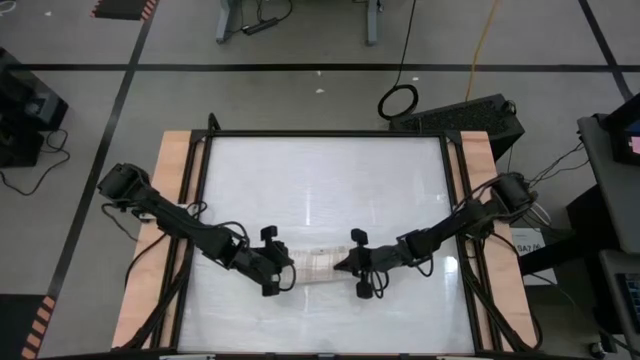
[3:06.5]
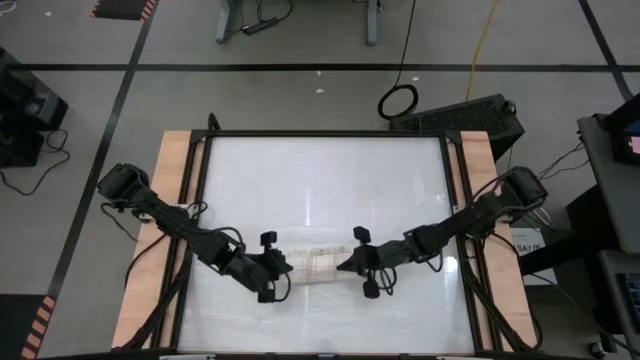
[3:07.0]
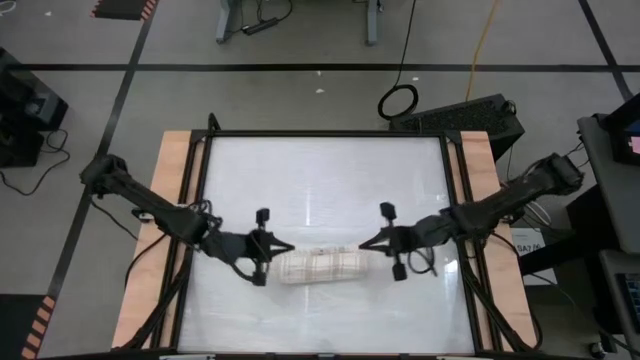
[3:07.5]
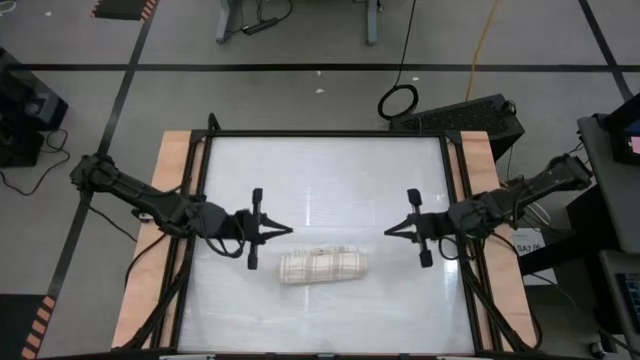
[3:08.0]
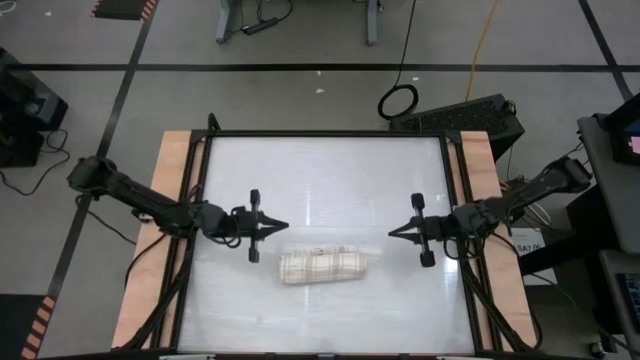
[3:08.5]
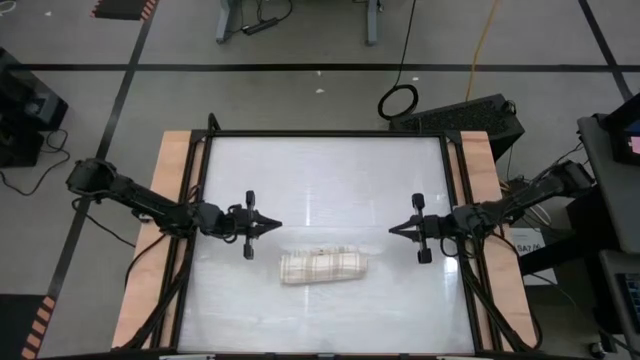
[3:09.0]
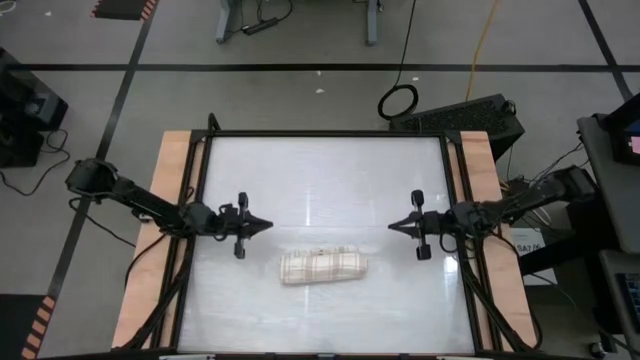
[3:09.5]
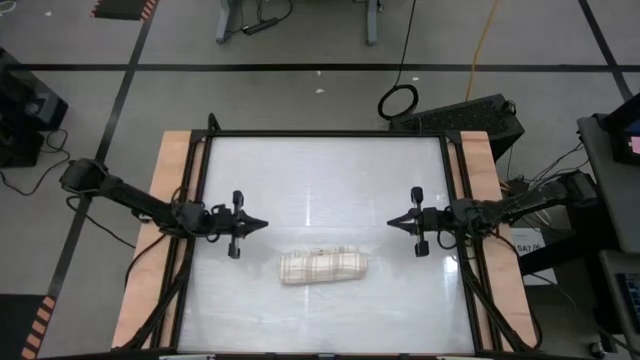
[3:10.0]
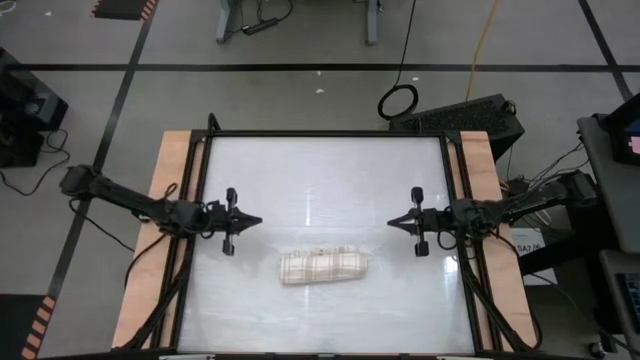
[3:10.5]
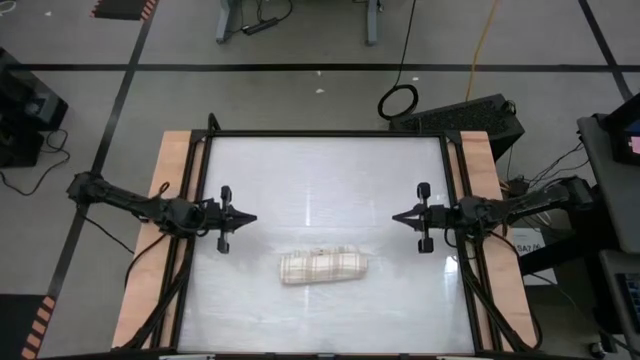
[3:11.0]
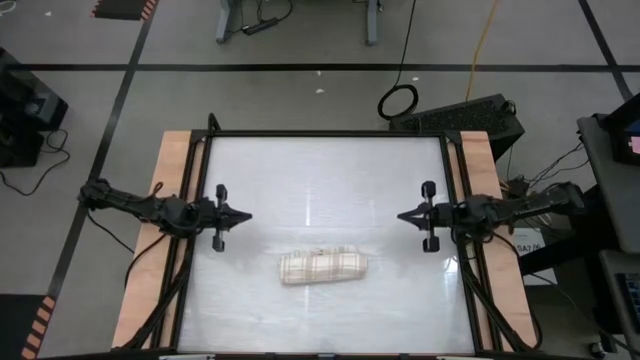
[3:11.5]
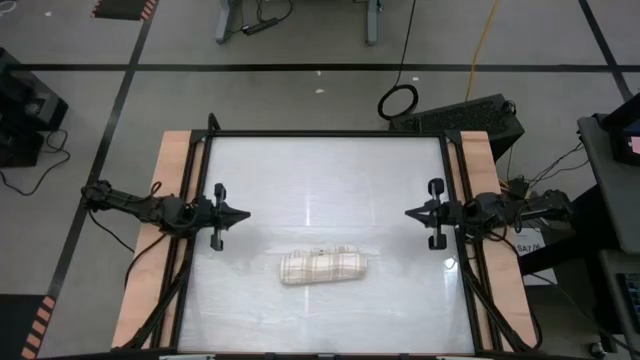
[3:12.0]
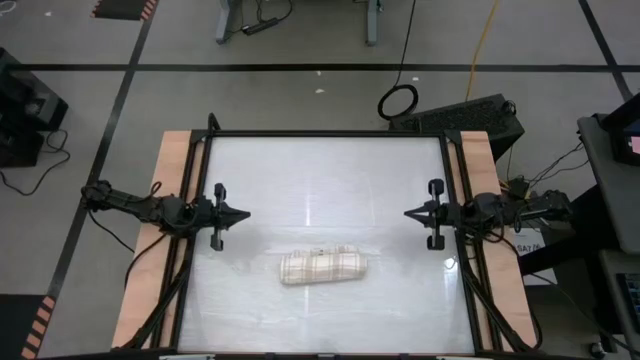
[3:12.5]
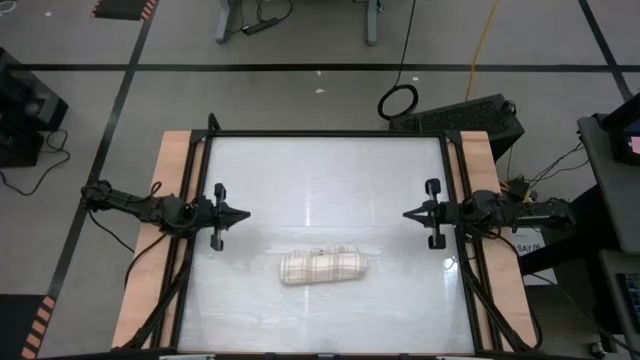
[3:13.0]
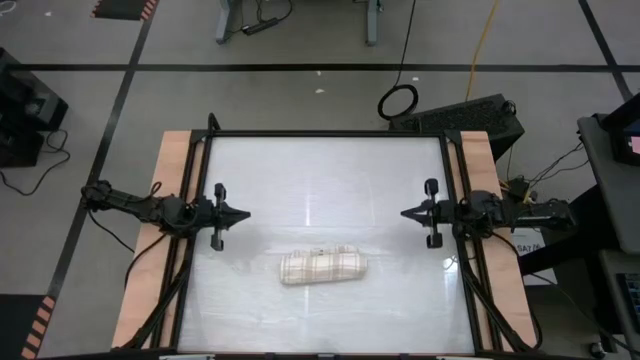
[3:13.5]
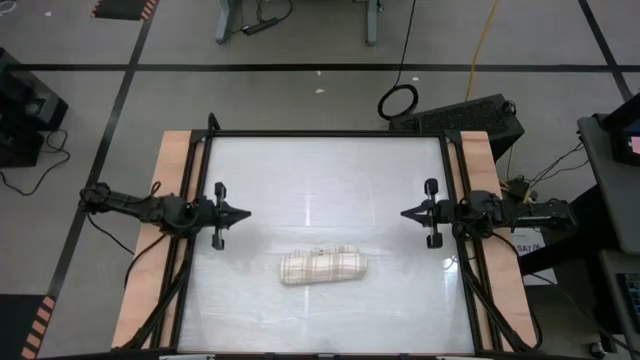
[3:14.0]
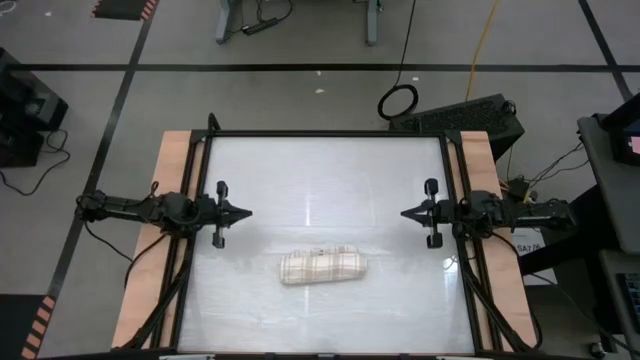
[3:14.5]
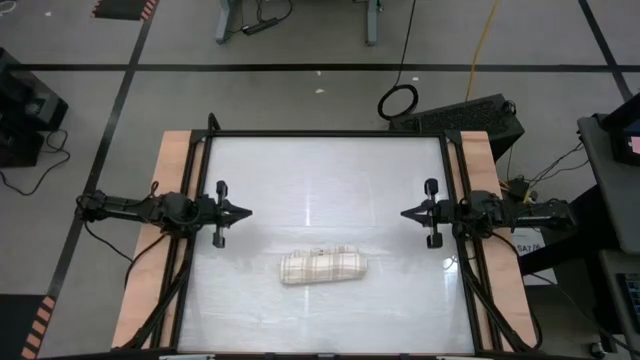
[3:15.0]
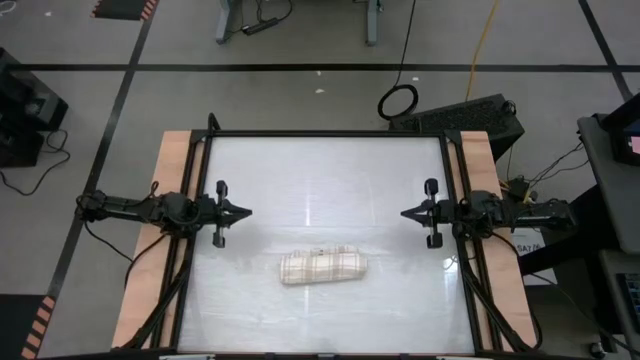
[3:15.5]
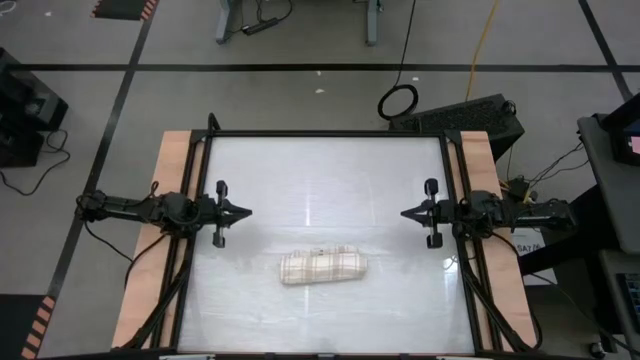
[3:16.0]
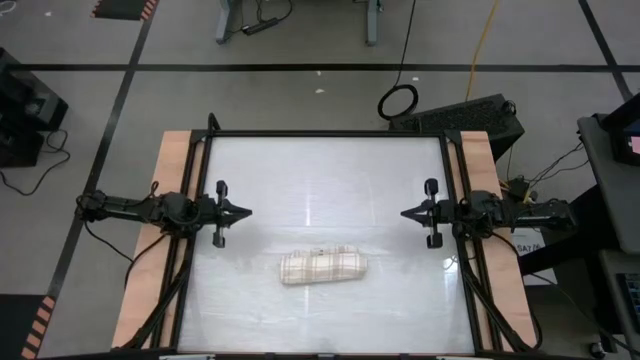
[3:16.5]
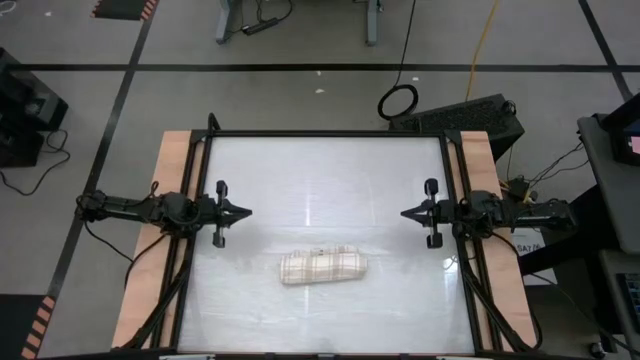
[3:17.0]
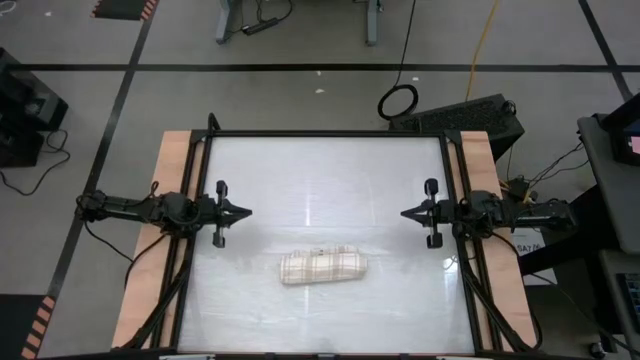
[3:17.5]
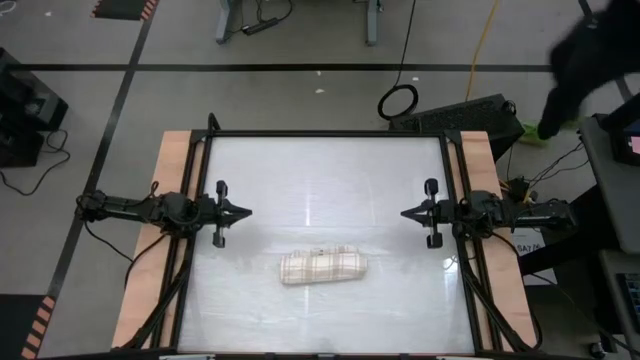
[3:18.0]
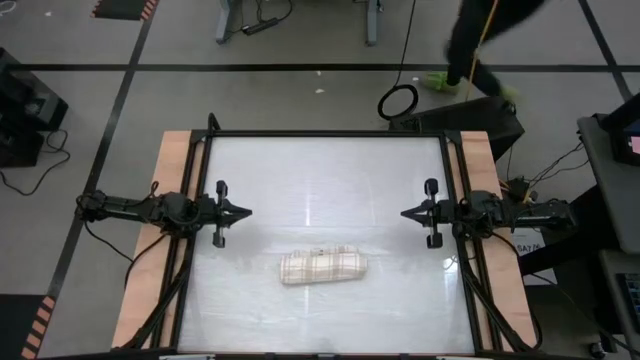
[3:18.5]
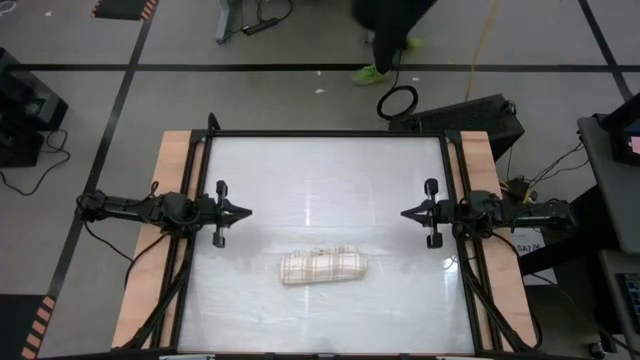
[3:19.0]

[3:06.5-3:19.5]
Task: Roll towel
Return to Home Position

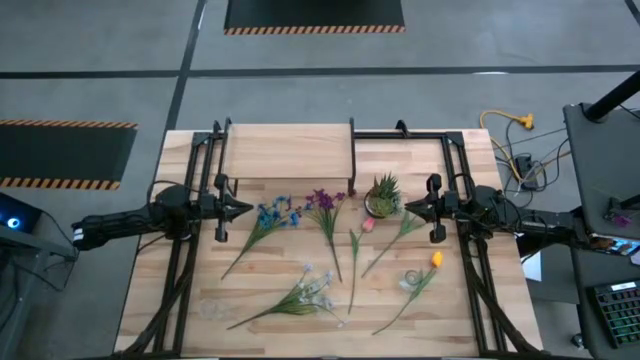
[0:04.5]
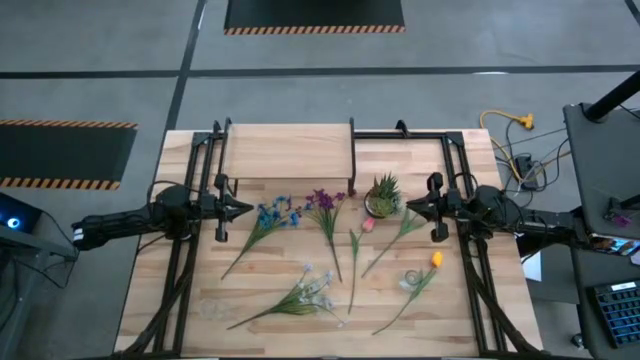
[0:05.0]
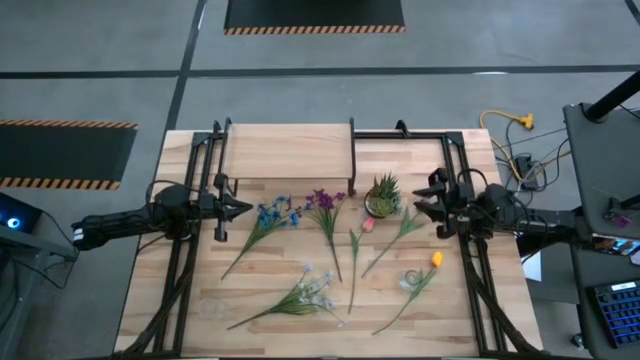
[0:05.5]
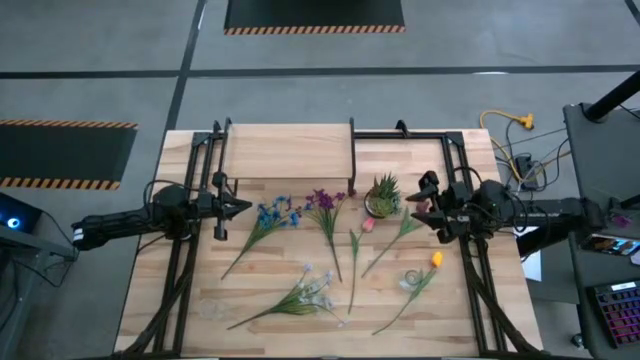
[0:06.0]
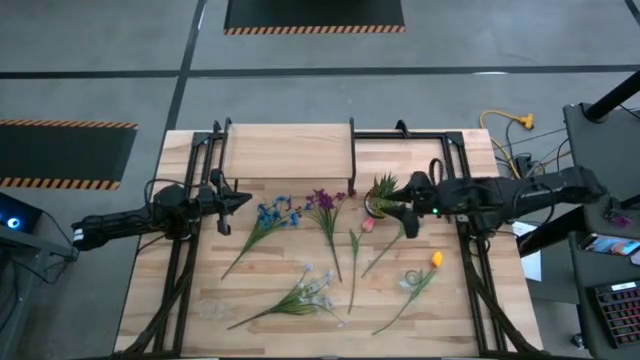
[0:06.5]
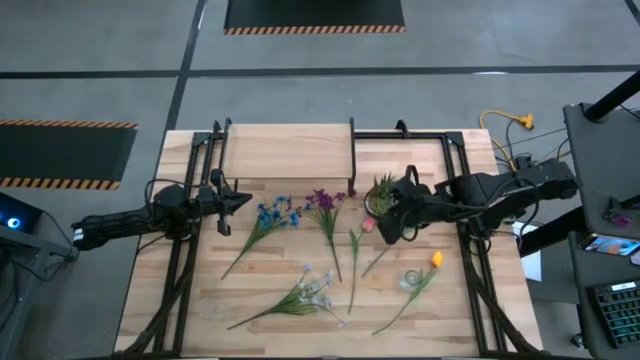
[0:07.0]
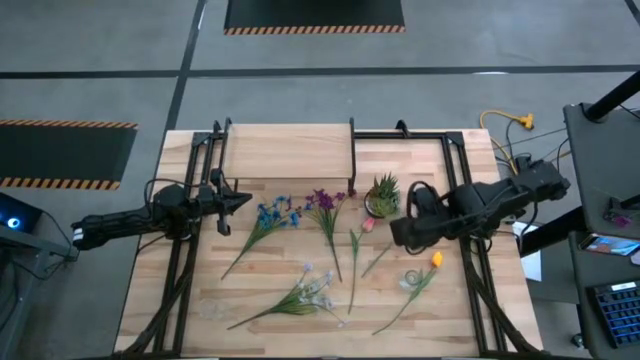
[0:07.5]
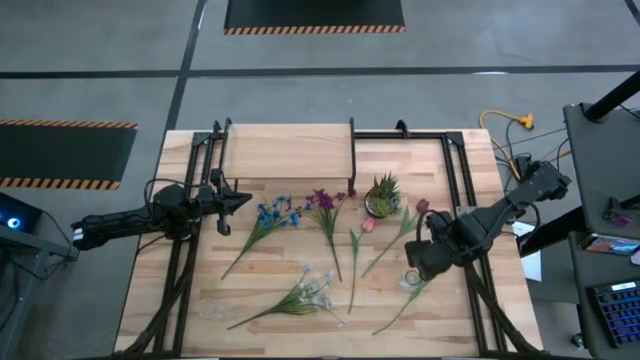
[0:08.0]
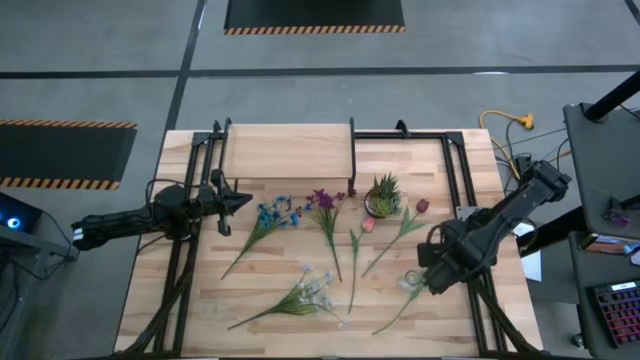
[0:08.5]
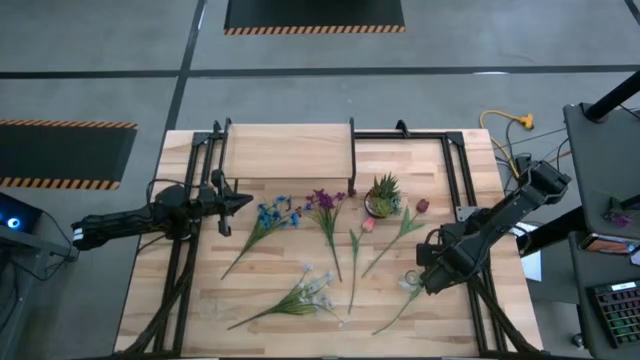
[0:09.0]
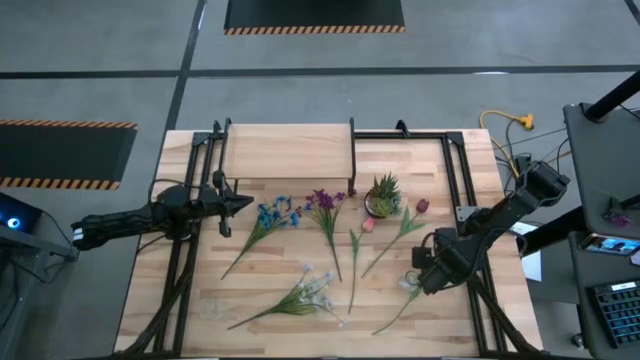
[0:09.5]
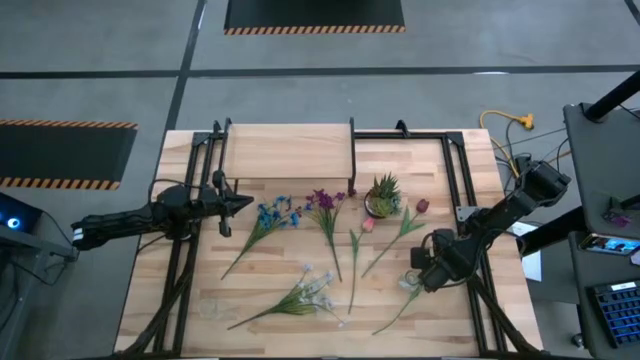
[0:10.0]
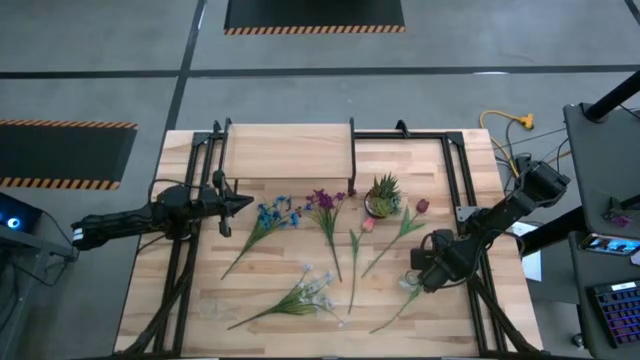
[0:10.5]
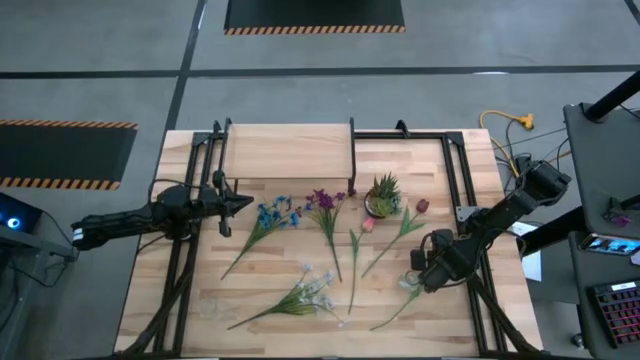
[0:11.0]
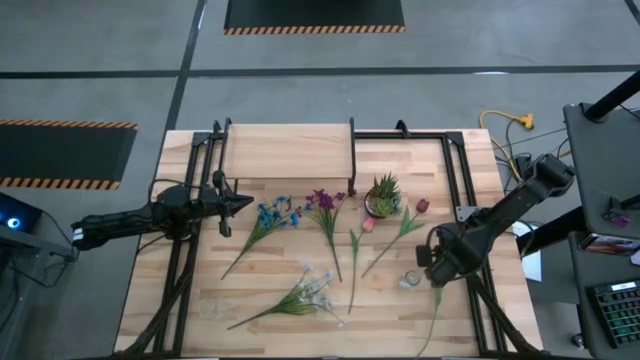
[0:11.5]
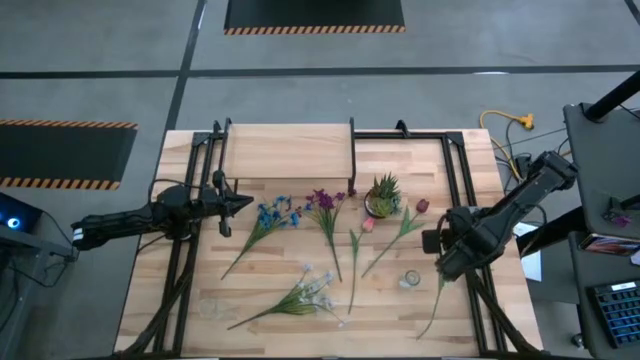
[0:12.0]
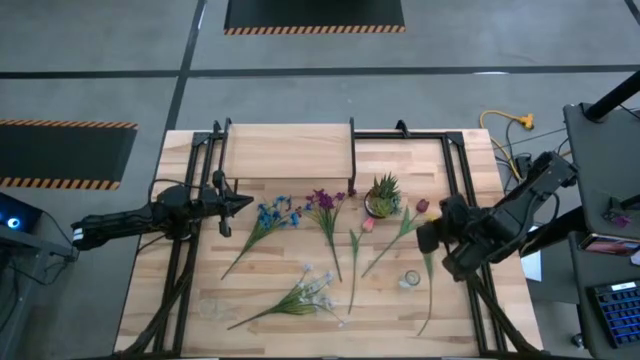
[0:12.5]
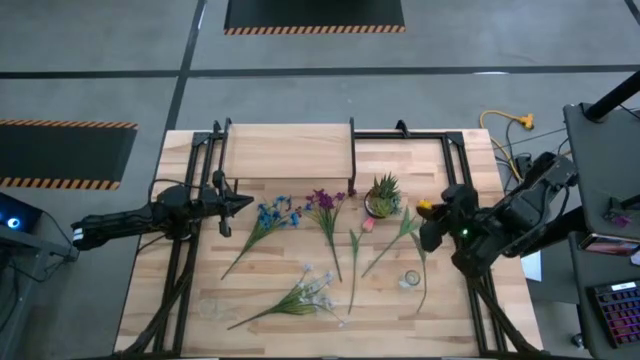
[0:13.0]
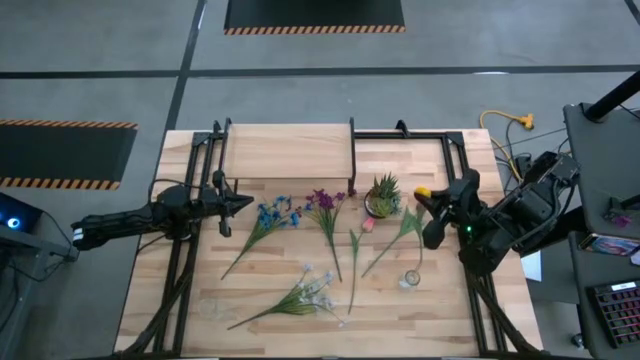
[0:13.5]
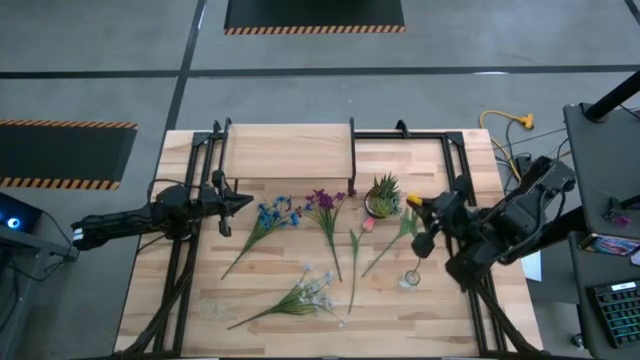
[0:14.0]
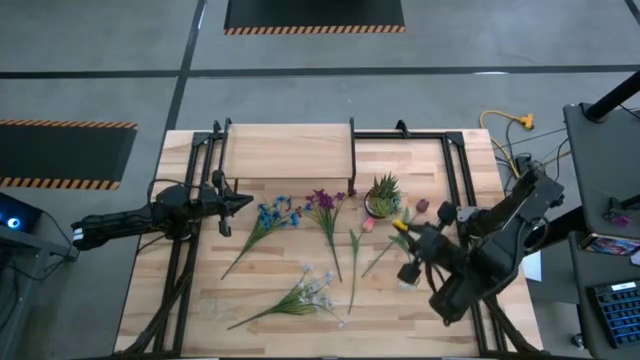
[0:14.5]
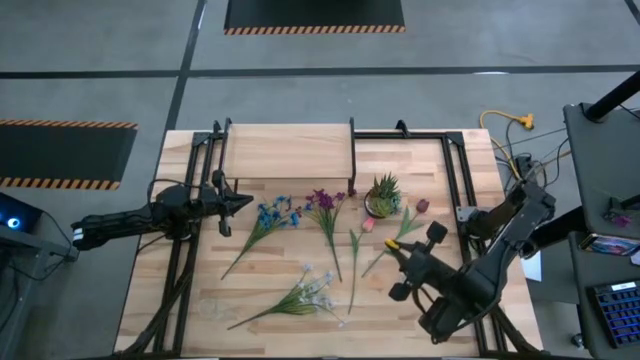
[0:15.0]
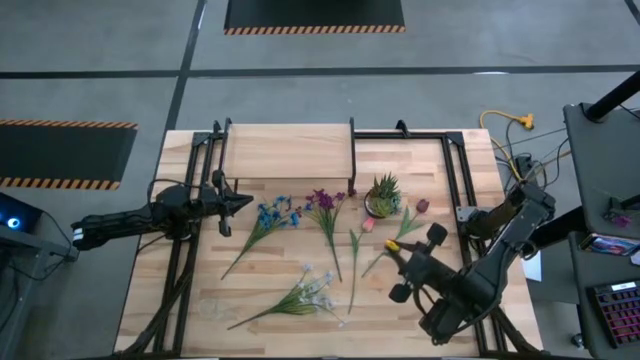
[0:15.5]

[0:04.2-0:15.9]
Task: Pick and place flowers into a vace then onto a shelf
Put the yellow tulip into the right transparent vase
